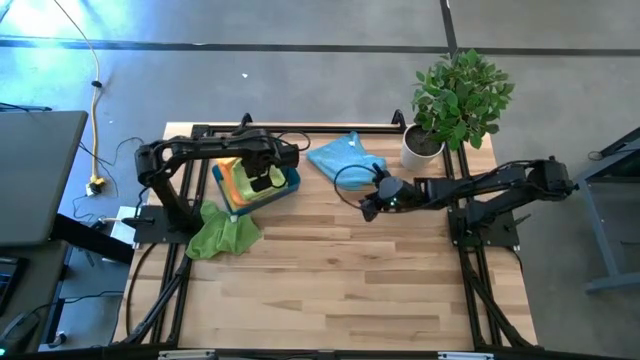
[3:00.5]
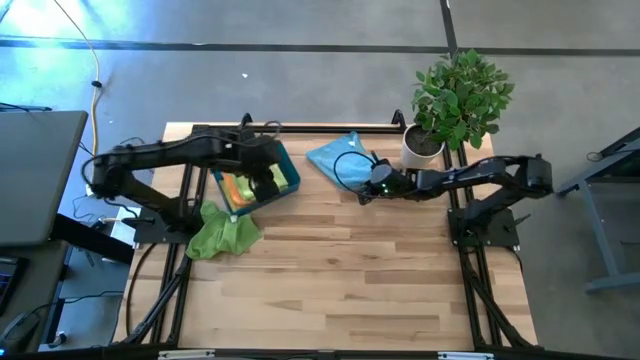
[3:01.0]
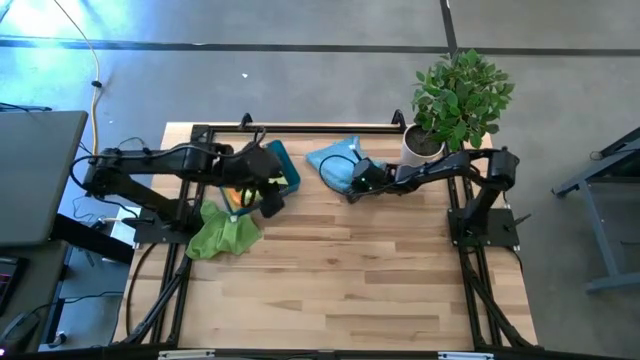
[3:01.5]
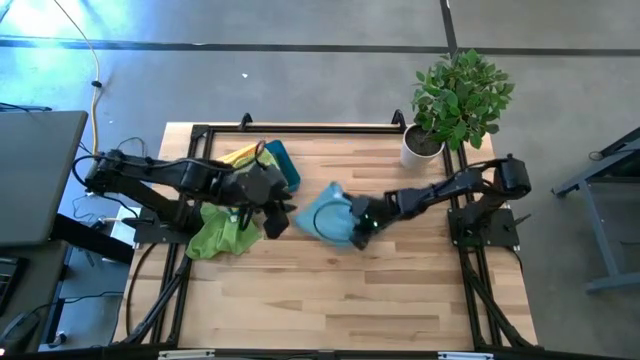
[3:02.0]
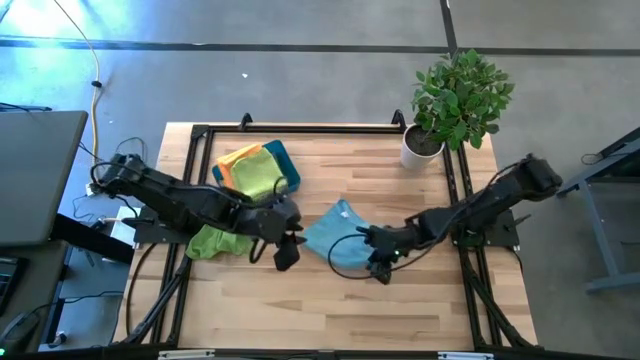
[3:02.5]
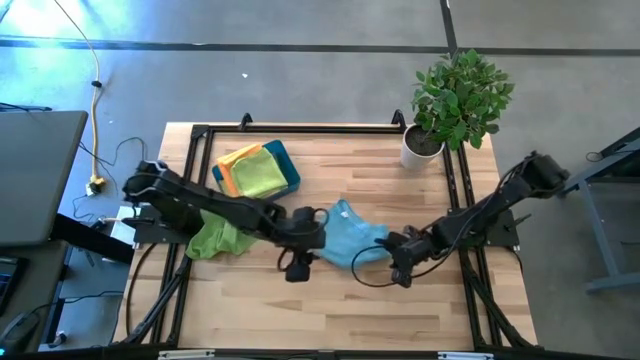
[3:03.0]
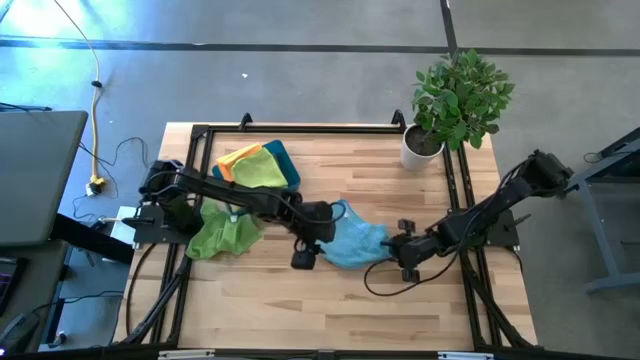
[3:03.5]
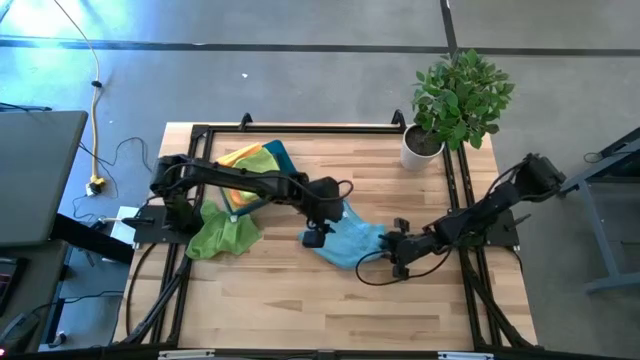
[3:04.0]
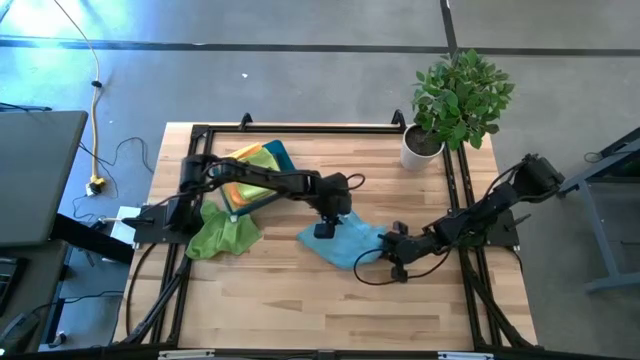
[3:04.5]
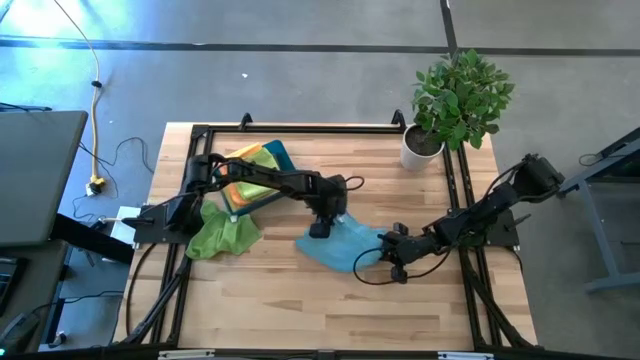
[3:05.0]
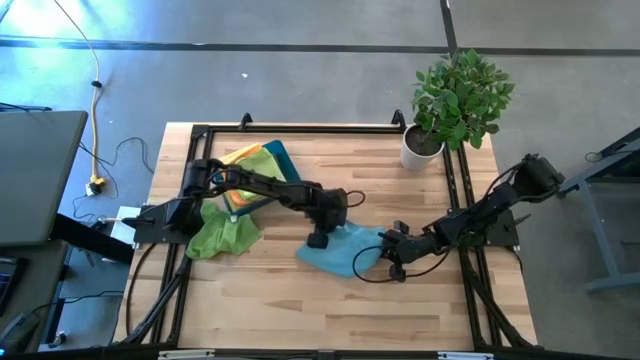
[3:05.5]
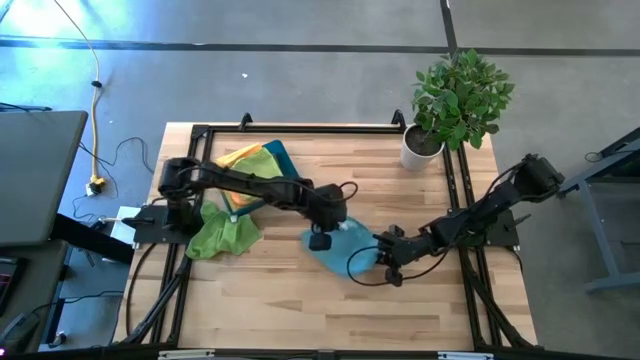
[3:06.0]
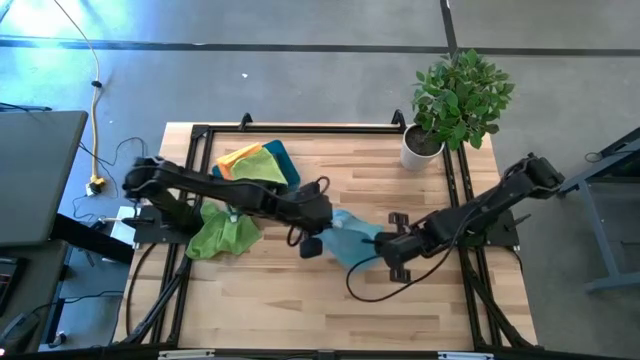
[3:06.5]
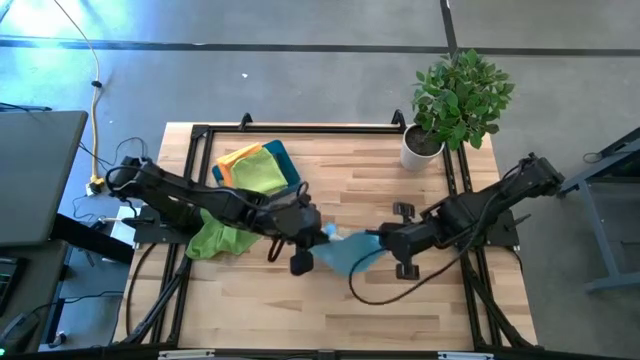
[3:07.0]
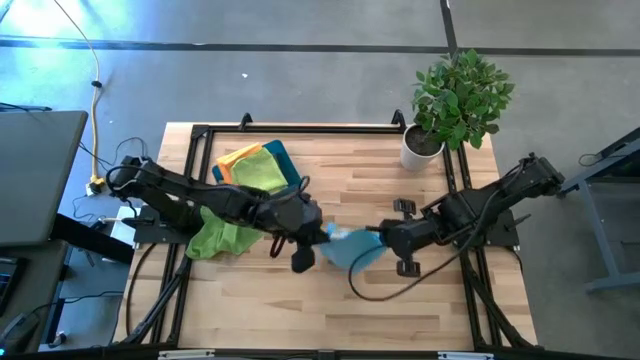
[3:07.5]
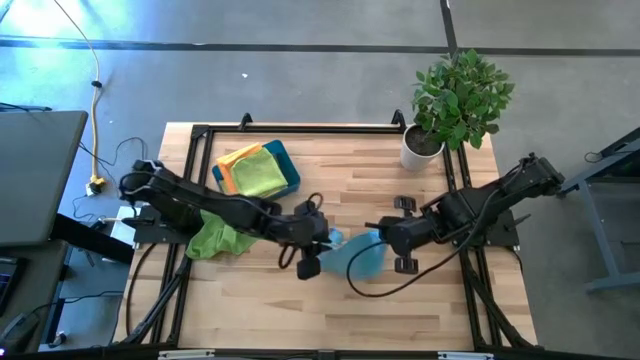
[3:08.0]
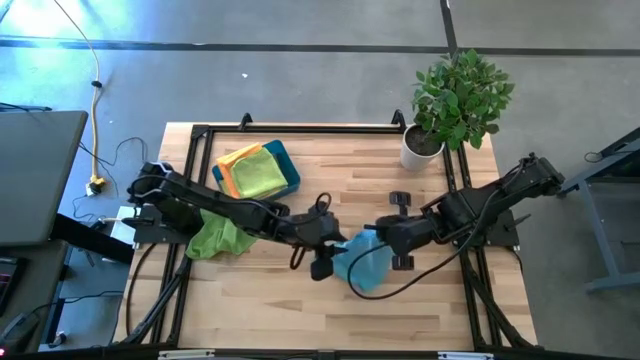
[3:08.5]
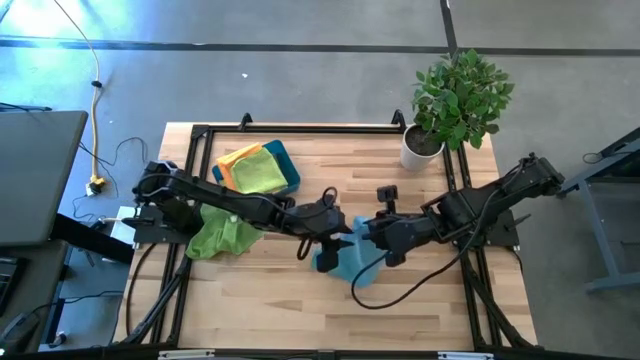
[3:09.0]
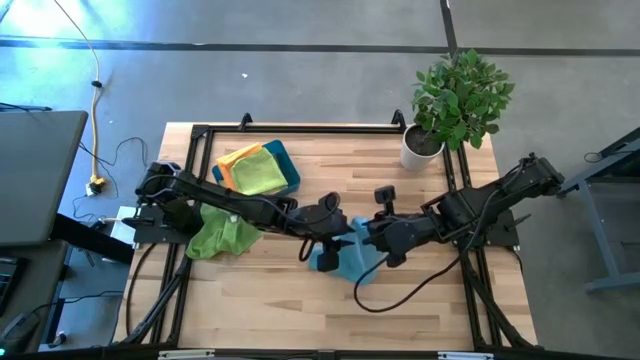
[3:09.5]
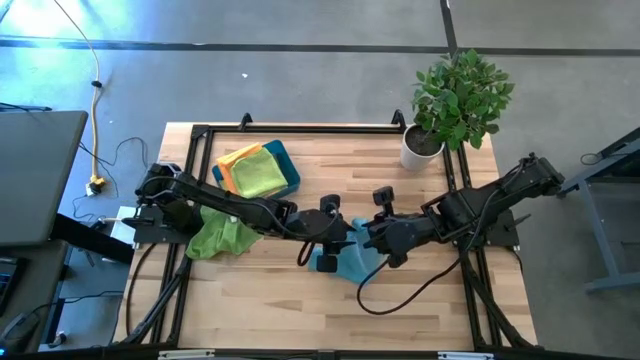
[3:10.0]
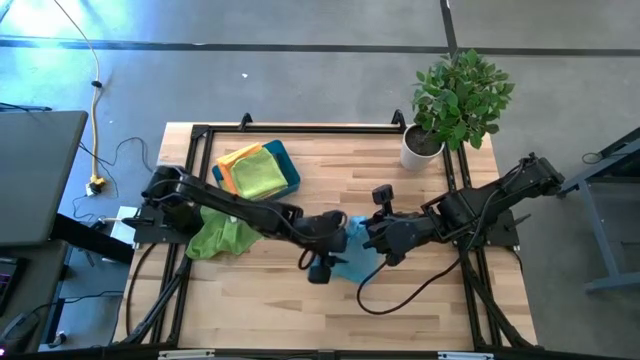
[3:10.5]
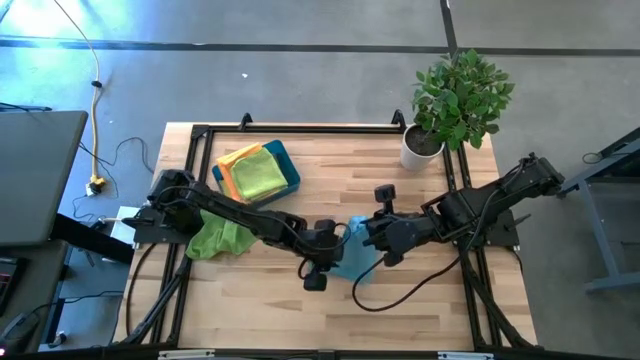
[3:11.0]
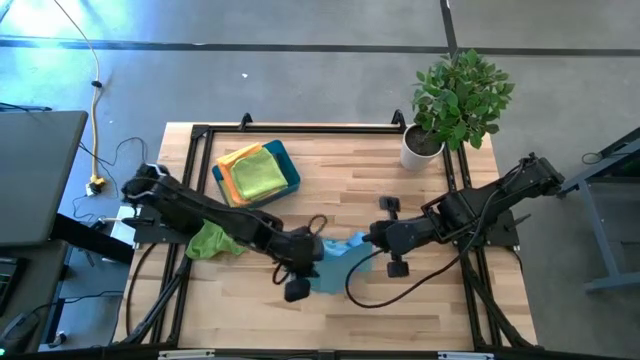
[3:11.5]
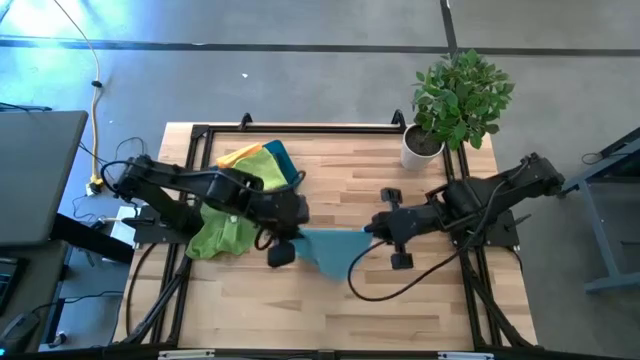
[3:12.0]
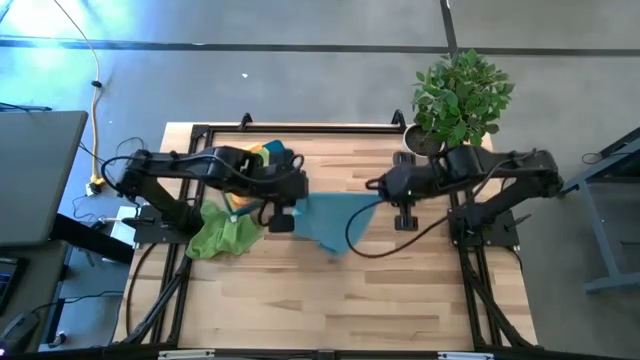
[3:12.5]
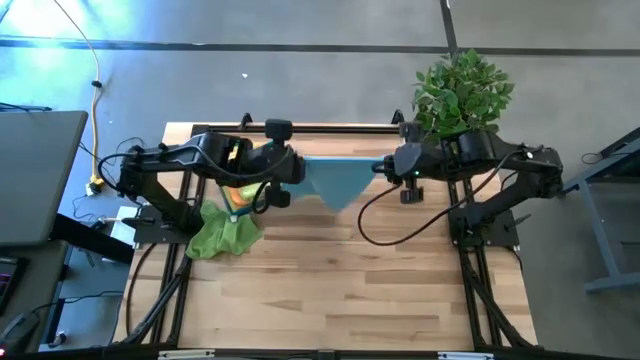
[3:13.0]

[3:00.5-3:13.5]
Task: Fold microfiber towels
Fold the blue microfiber cloth

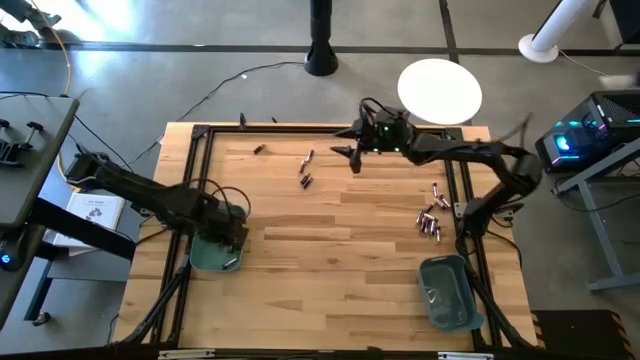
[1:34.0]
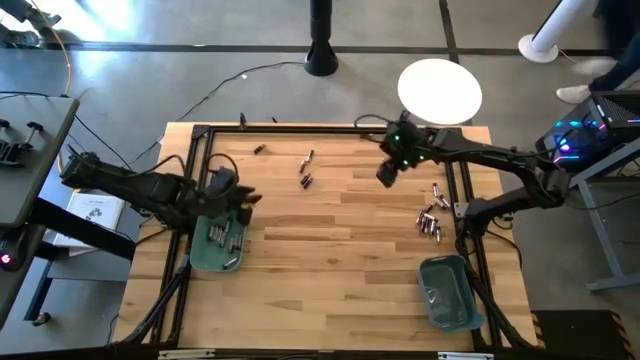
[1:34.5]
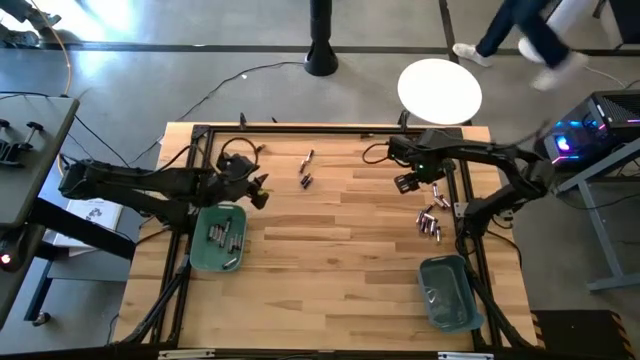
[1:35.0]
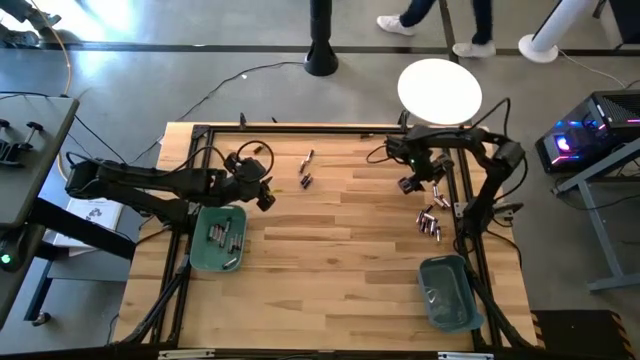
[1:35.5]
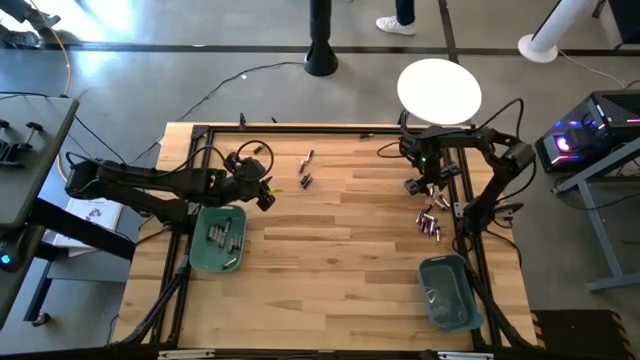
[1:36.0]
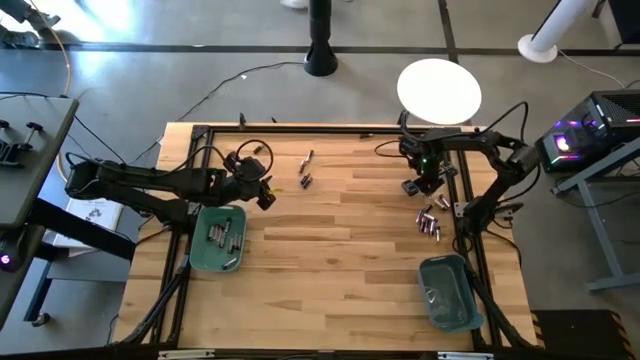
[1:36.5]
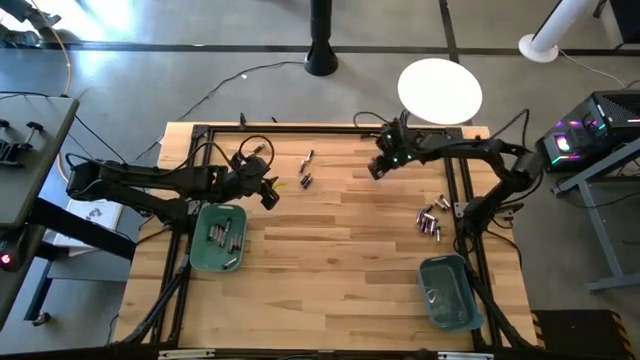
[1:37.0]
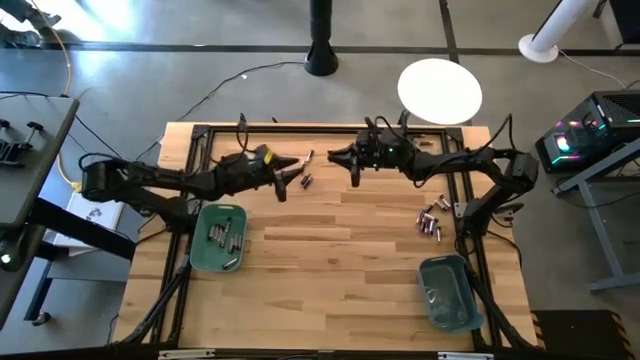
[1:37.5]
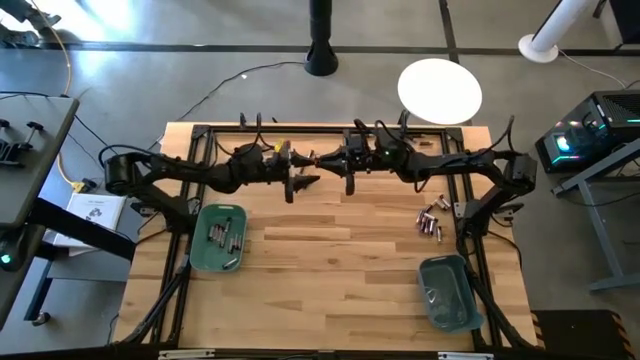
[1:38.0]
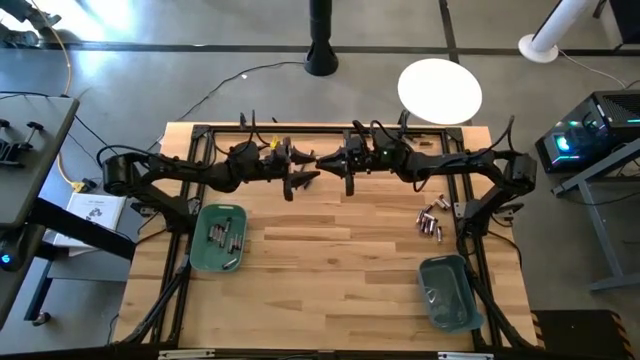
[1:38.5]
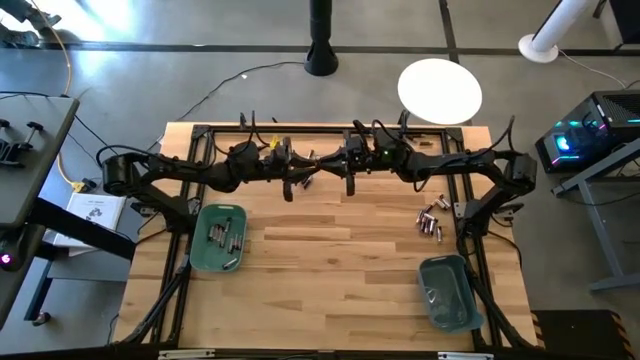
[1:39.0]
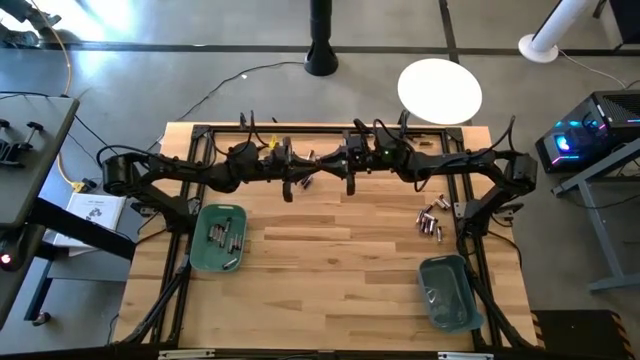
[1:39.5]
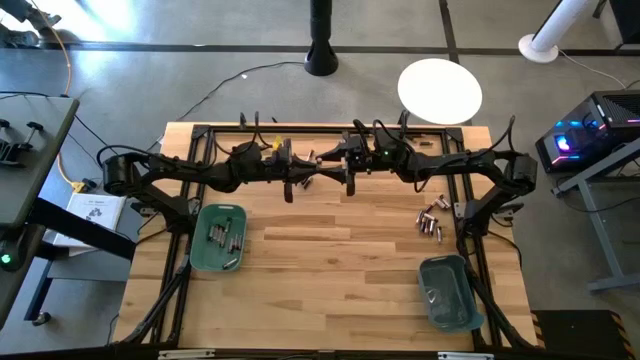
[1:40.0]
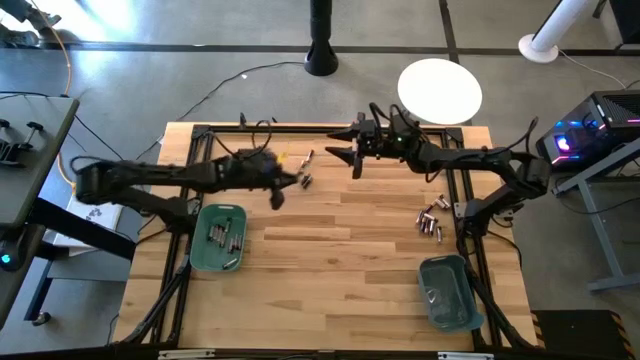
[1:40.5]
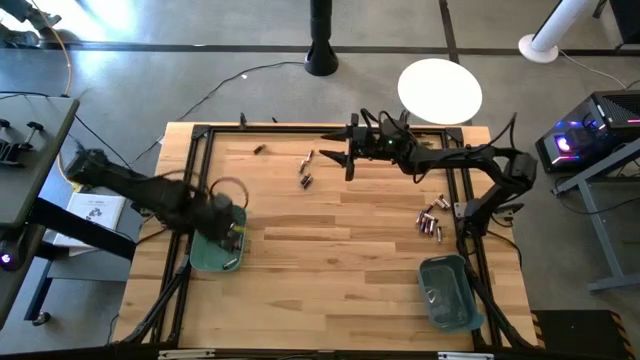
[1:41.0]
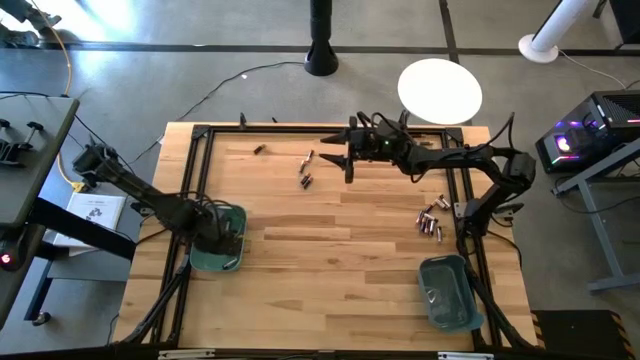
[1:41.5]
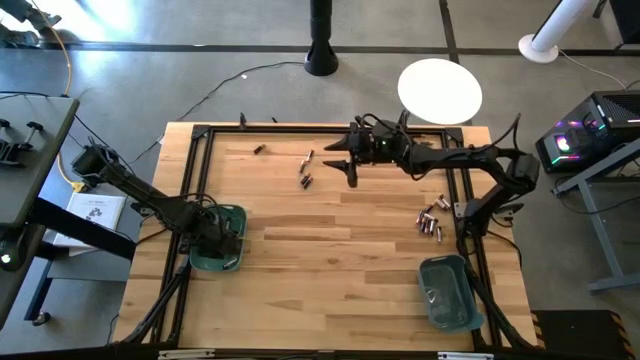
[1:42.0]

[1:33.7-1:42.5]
Task: Sort batteries
Put the silver battery into the green bin
